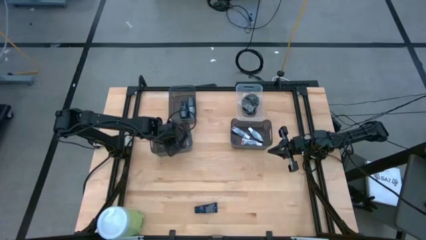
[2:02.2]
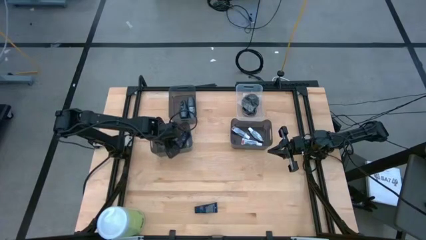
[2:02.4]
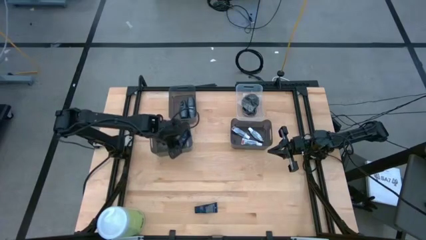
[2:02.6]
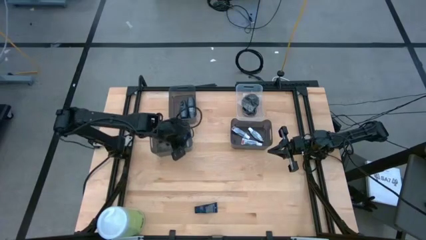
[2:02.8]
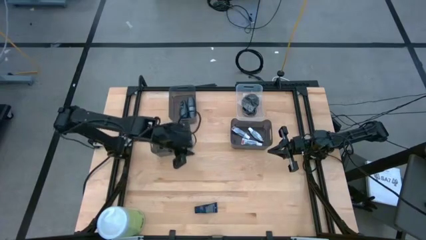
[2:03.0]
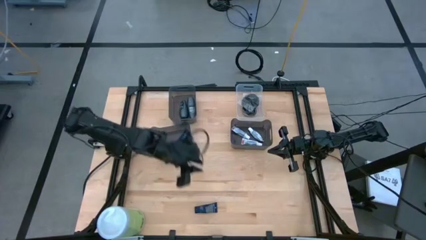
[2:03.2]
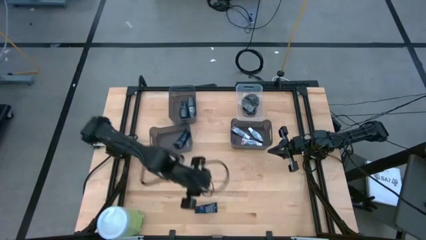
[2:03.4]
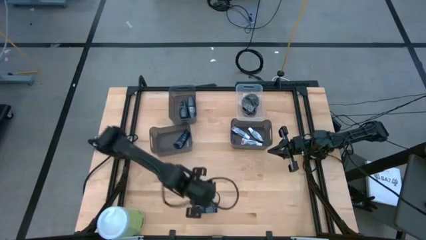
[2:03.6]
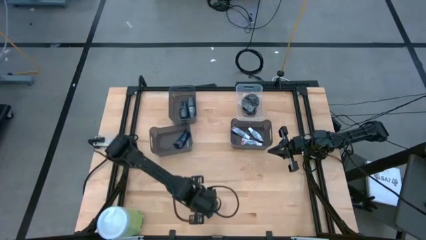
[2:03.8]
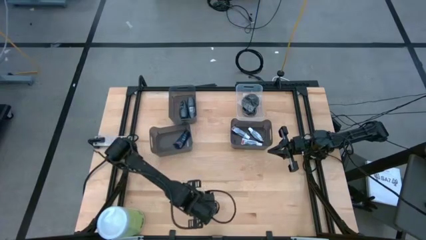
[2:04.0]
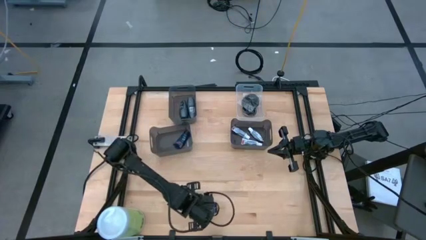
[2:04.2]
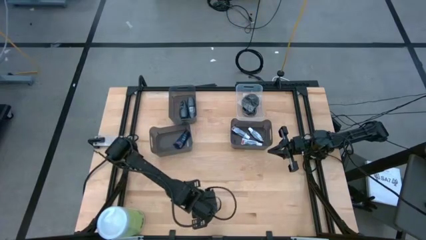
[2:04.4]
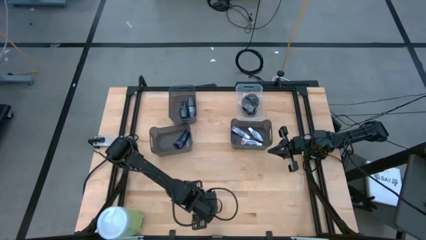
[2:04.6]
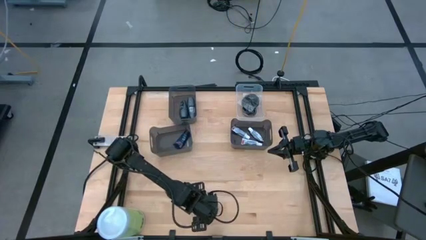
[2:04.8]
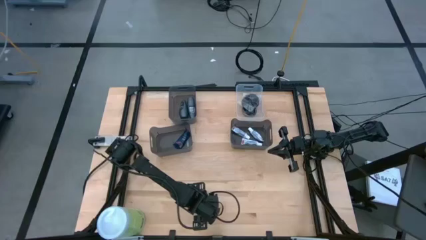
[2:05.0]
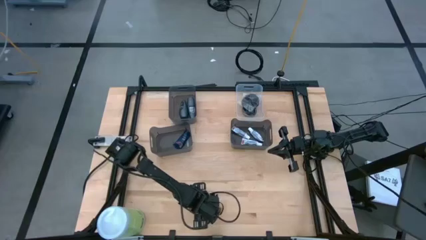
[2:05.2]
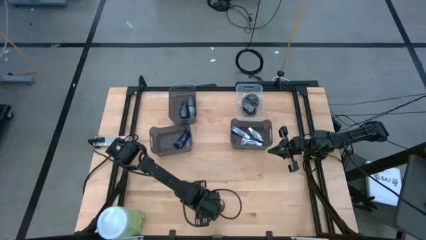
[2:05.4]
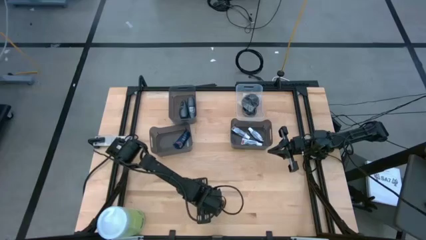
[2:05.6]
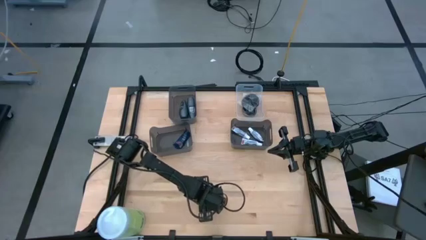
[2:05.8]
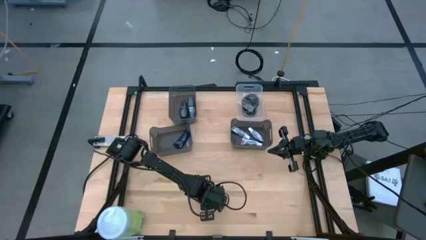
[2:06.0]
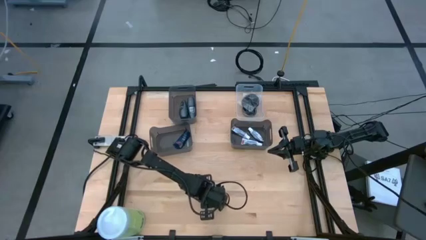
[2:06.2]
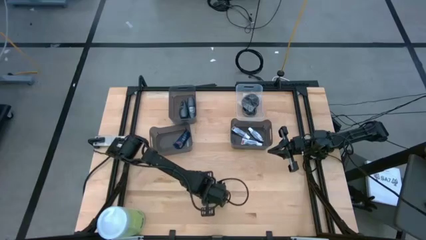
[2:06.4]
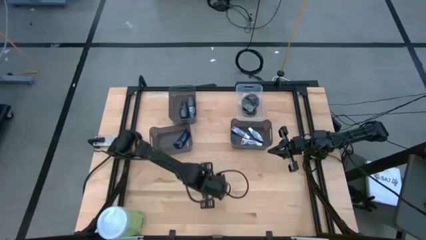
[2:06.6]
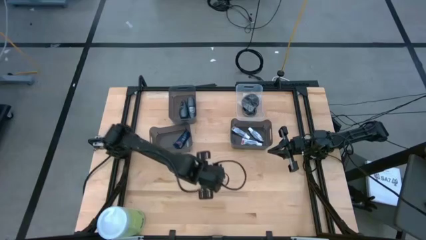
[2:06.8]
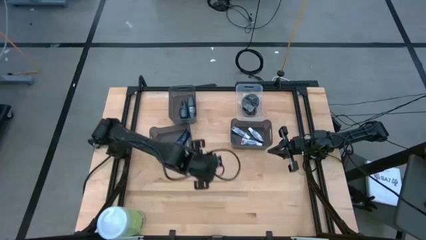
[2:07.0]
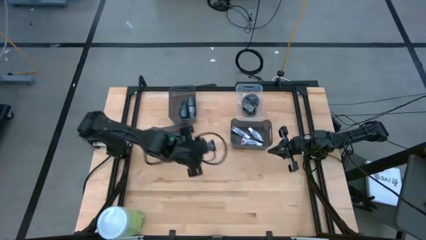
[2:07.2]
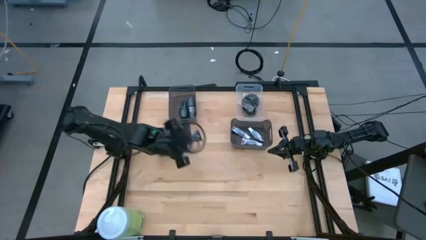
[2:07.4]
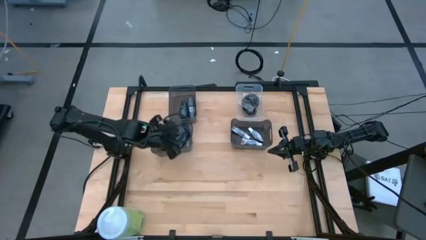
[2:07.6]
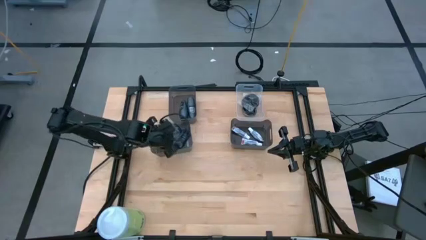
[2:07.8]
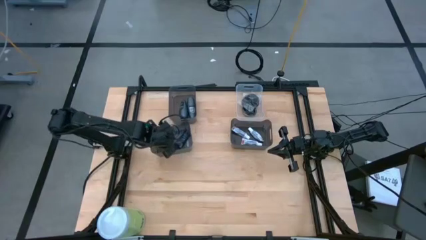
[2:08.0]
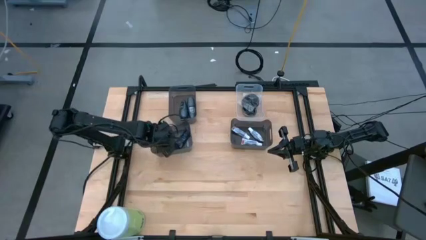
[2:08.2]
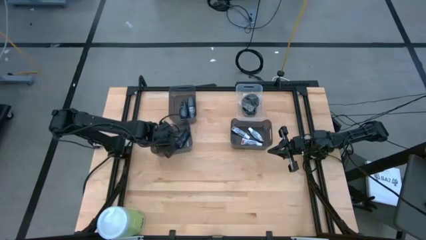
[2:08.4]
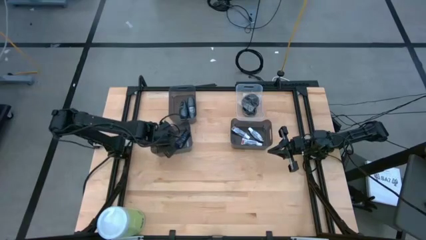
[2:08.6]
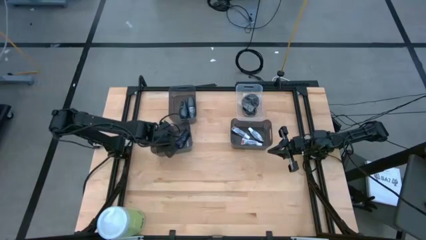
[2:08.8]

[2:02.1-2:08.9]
Task: Pick & Place Travel size toiletries
Put the dark blue shave cream into the bottom left black bin

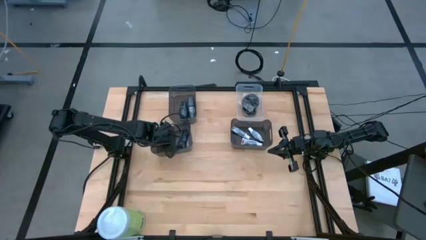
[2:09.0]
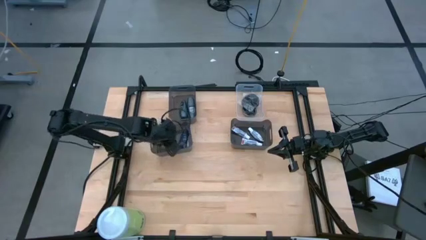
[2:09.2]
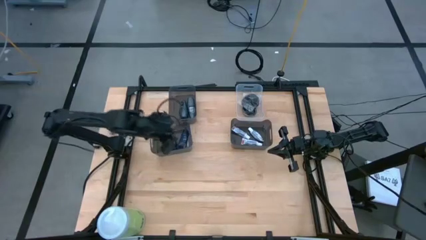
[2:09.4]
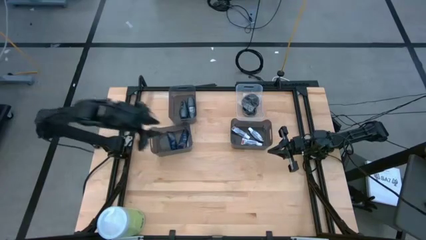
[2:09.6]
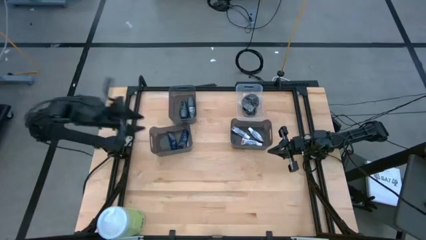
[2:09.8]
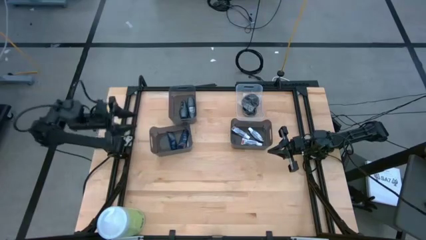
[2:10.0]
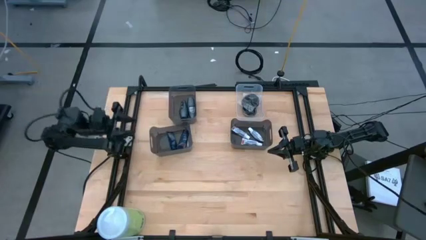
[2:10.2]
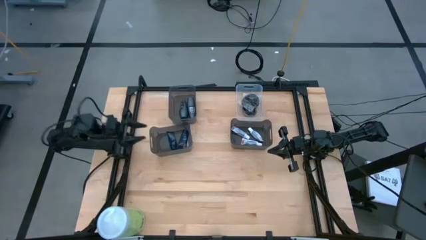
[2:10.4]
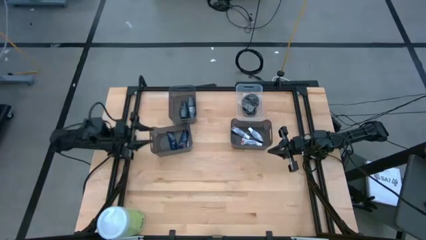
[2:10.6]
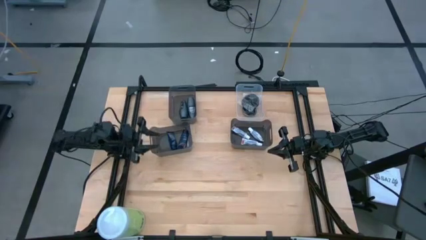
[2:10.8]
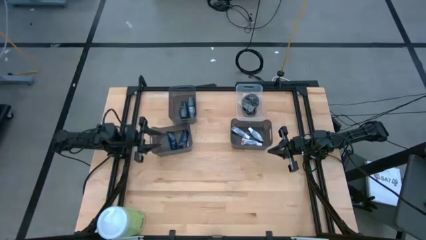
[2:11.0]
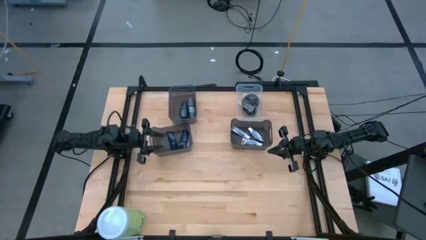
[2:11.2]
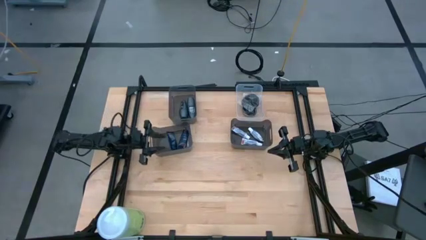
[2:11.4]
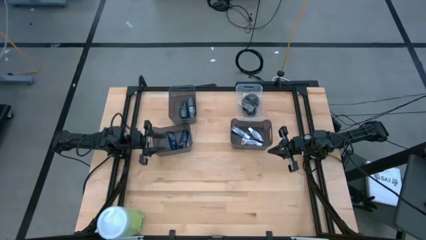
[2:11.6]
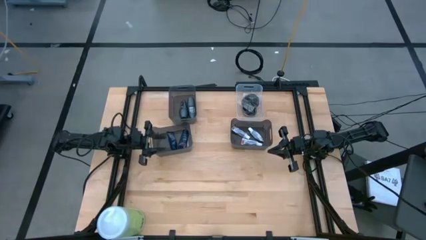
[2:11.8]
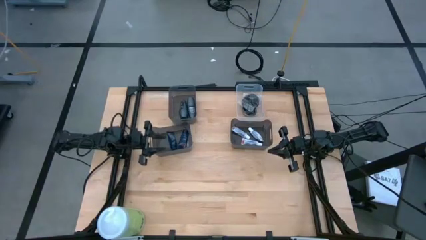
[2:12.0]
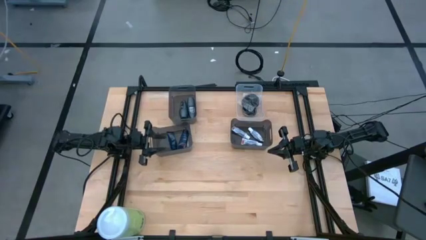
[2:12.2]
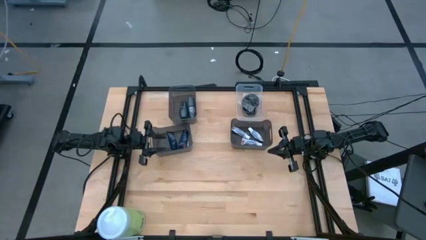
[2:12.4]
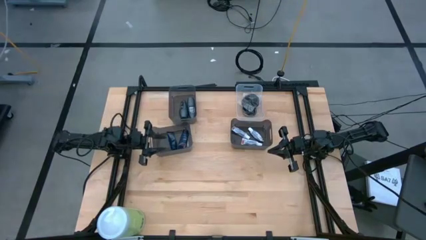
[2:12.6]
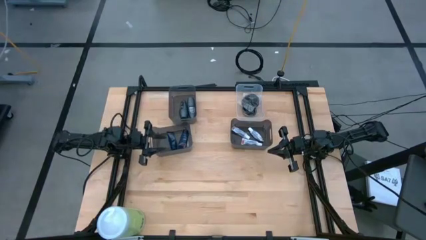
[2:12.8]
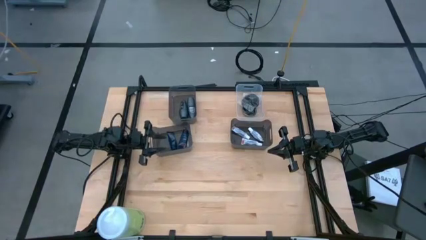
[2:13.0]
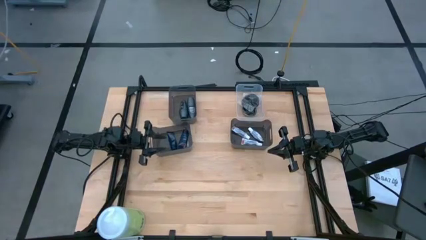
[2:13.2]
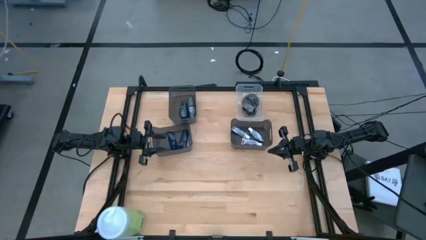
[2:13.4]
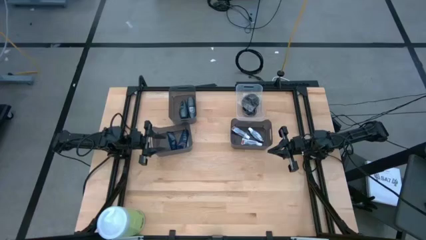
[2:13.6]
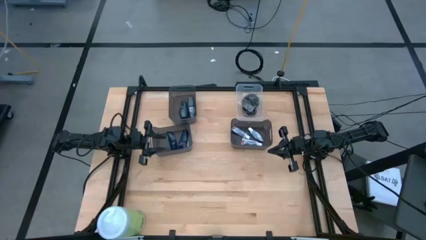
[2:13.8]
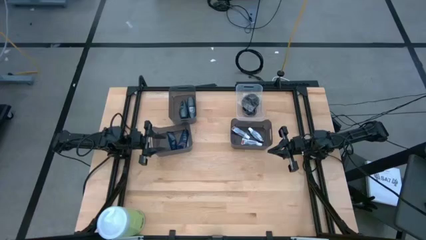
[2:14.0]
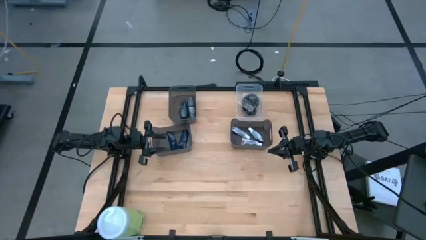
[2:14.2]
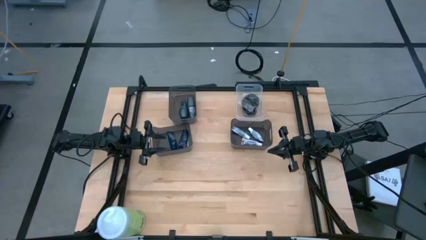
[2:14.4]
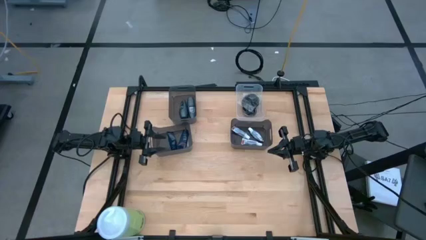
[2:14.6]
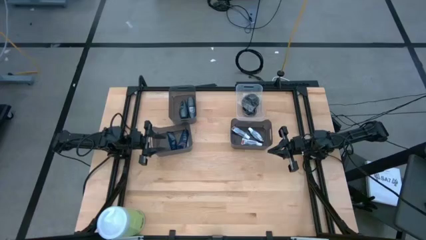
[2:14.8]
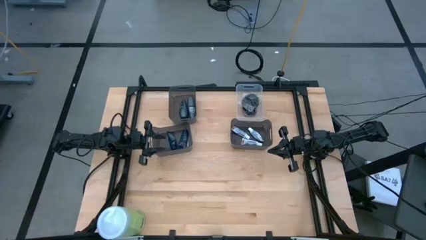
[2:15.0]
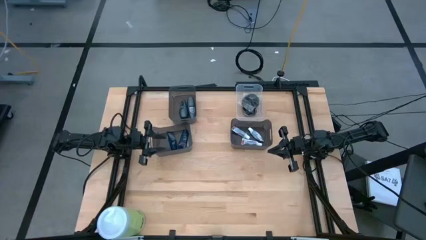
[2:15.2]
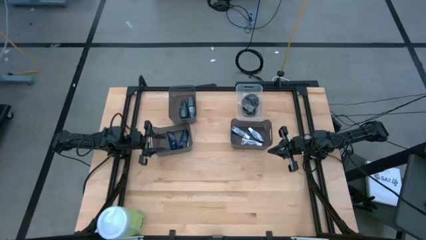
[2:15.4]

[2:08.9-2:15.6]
Return to Home Position

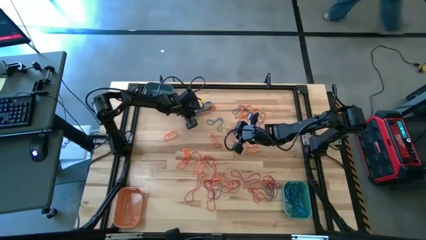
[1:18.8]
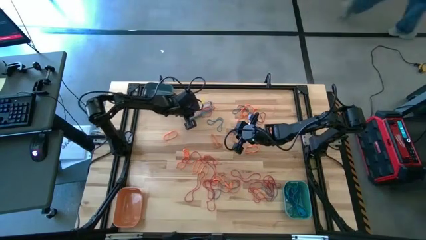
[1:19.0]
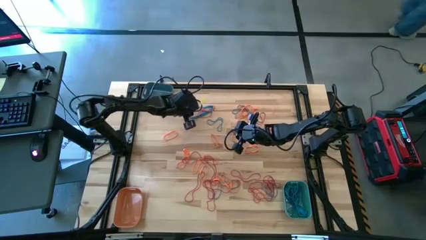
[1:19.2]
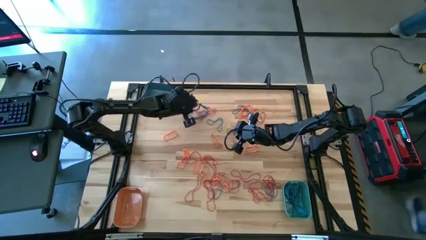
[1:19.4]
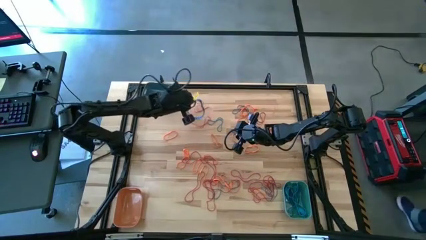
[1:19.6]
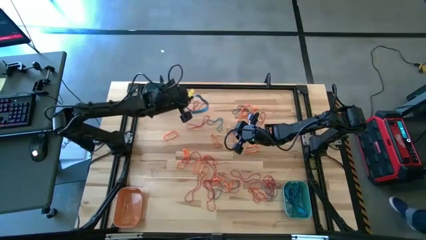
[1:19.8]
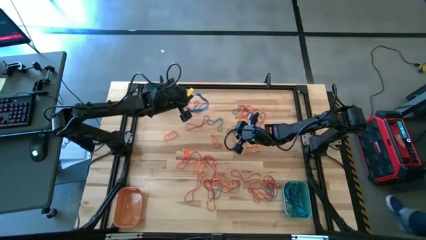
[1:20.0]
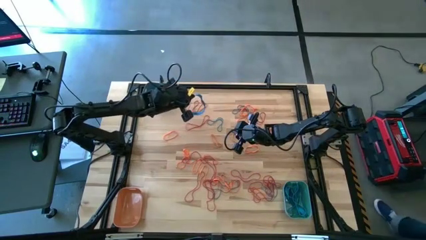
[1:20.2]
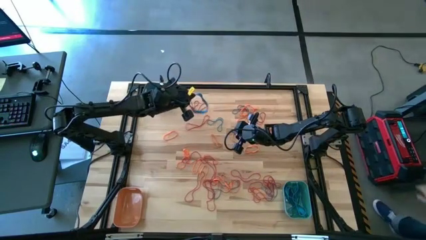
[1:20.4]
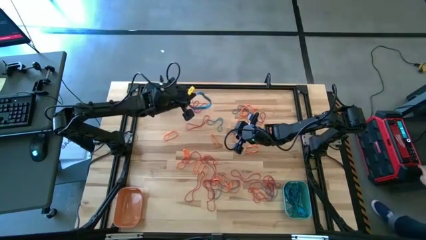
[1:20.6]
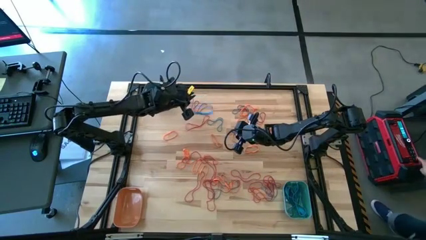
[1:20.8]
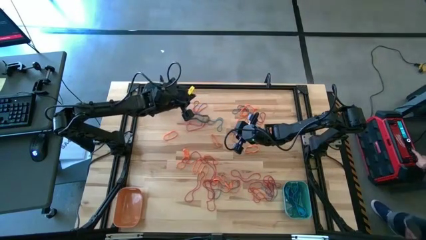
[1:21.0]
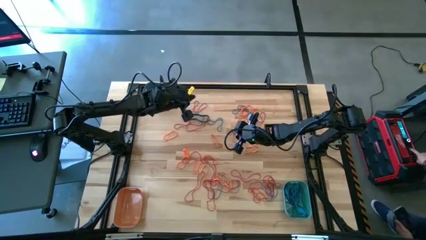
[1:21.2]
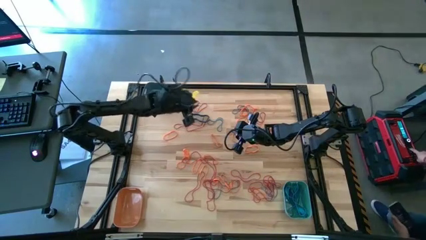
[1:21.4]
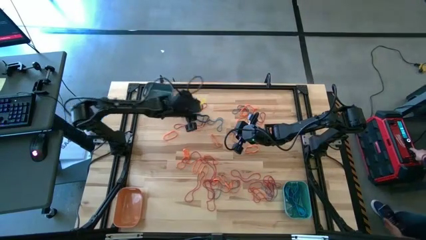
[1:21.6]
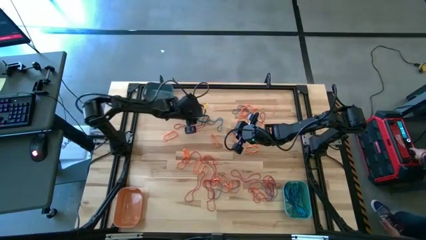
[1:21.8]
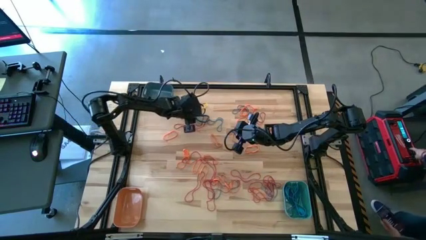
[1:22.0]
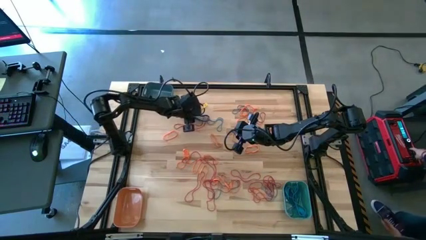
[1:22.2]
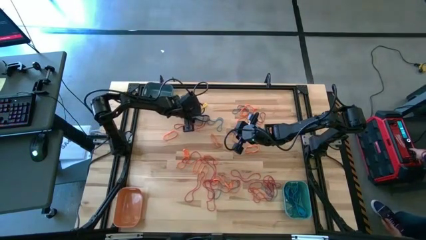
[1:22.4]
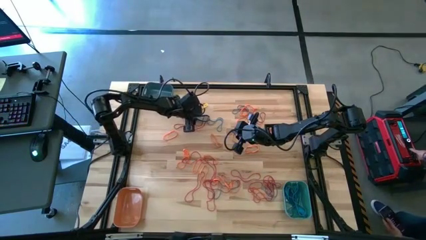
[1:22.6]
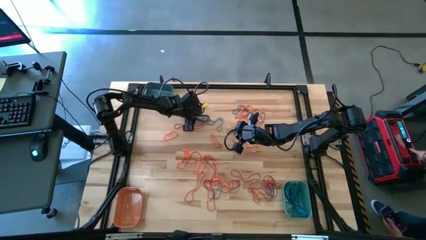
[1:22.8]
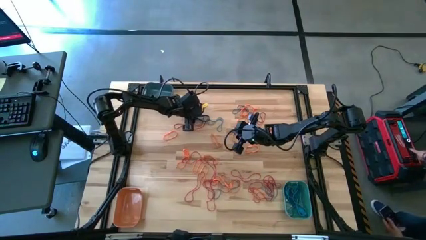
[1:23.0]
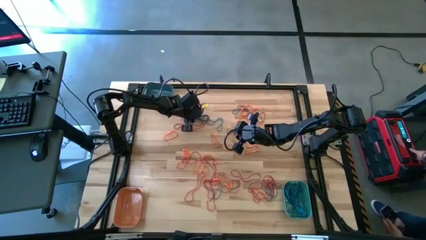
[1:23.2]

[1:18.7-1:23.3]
Task: Sort rubber bands into baskets
Put the blue rubber band into the light blue bin
